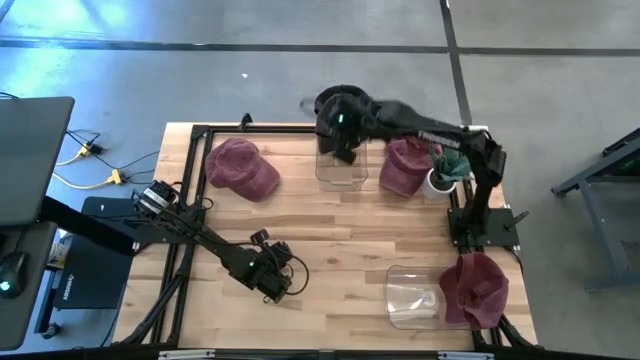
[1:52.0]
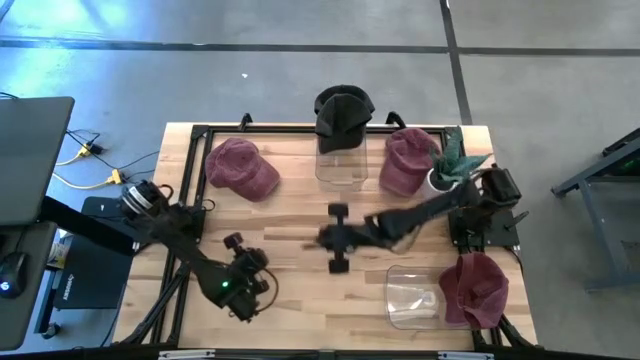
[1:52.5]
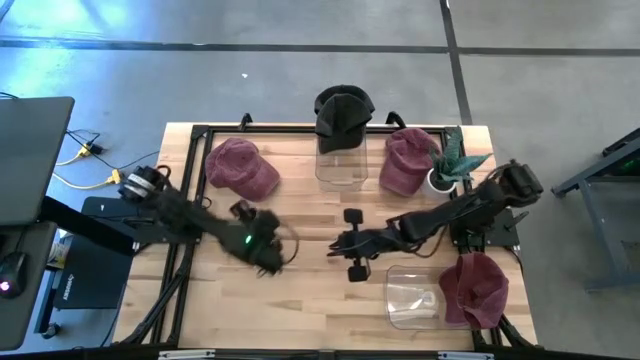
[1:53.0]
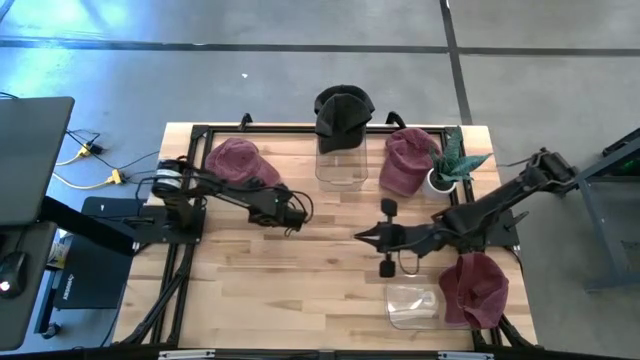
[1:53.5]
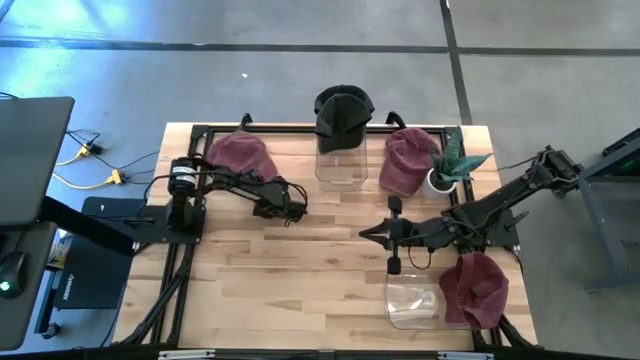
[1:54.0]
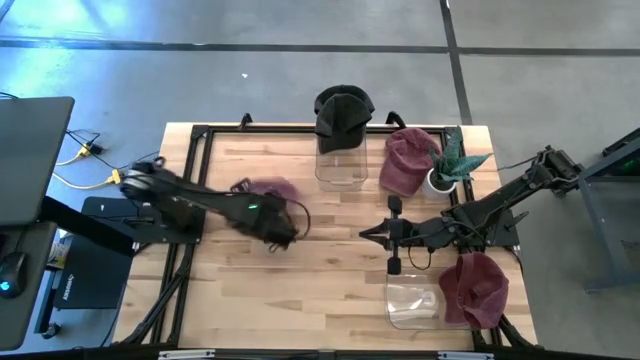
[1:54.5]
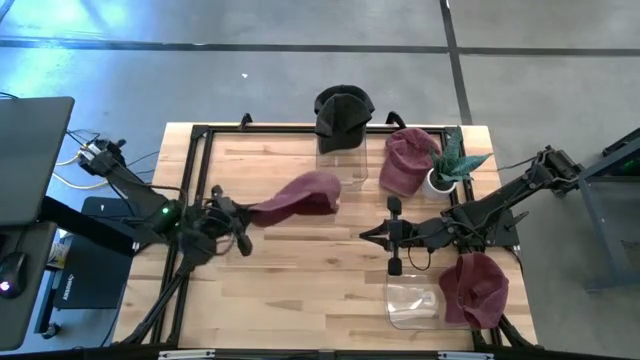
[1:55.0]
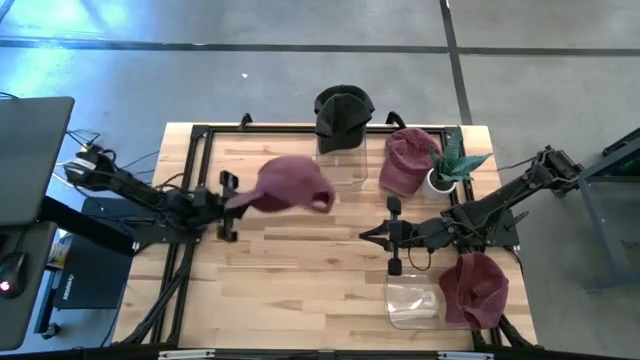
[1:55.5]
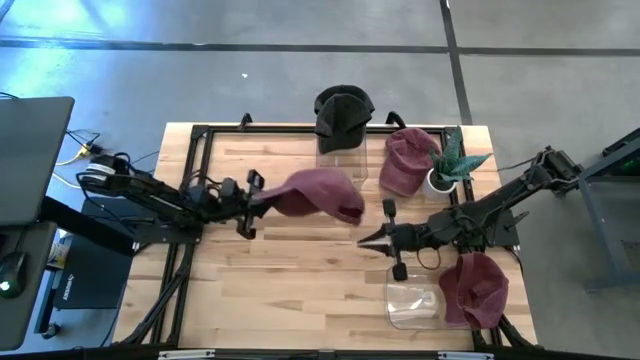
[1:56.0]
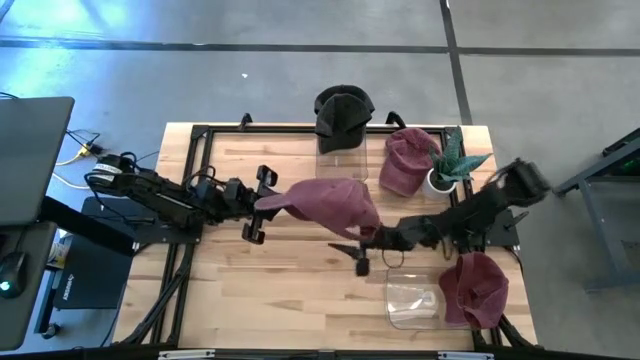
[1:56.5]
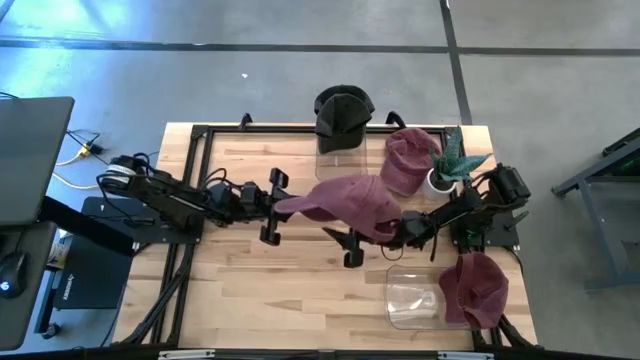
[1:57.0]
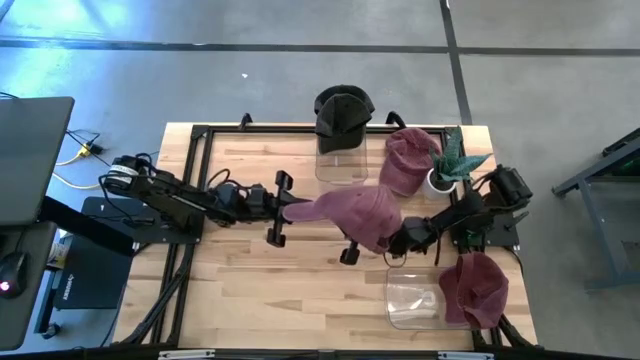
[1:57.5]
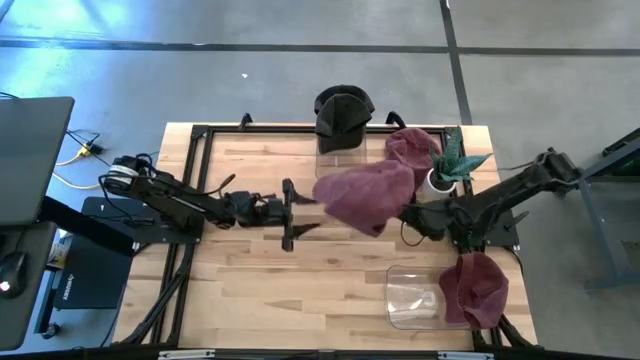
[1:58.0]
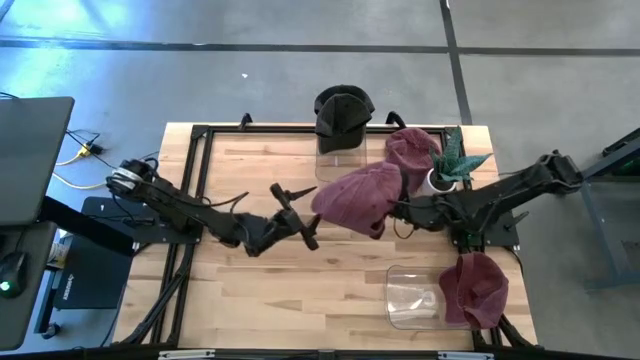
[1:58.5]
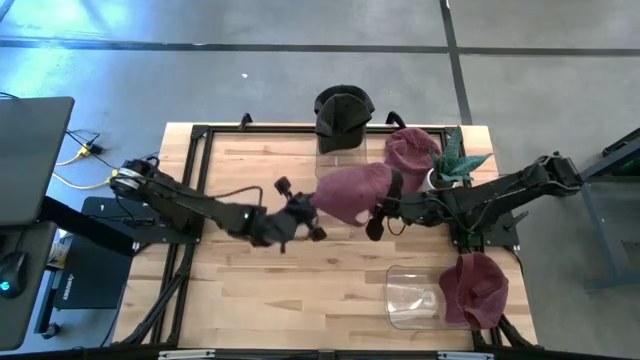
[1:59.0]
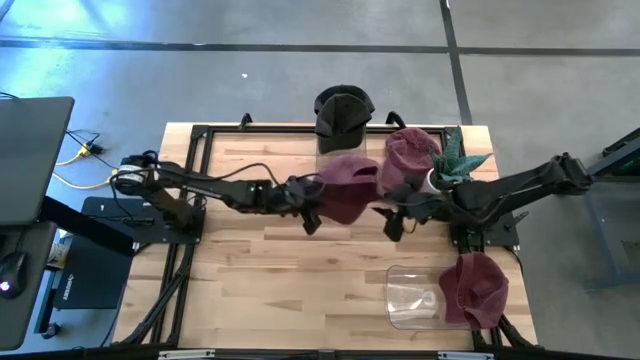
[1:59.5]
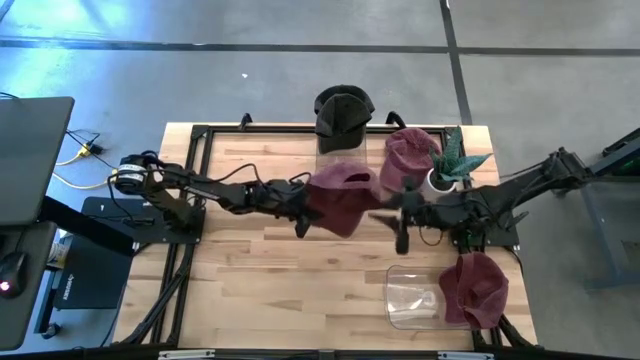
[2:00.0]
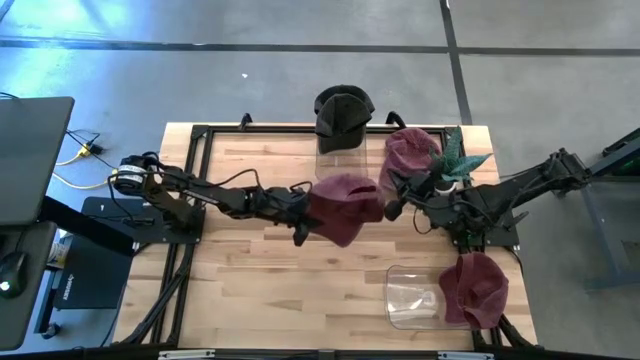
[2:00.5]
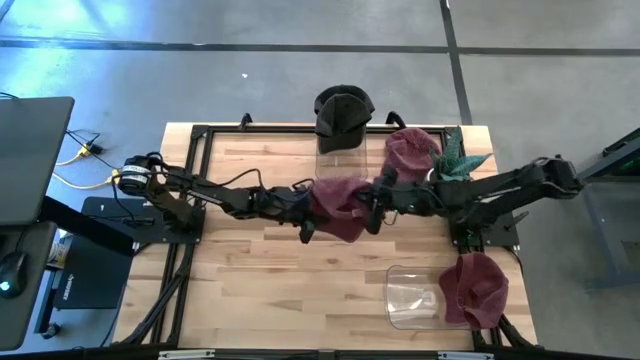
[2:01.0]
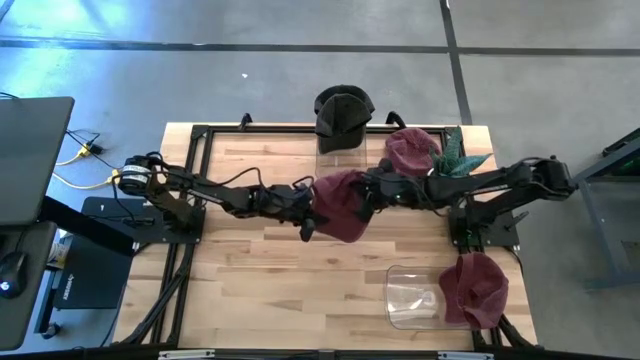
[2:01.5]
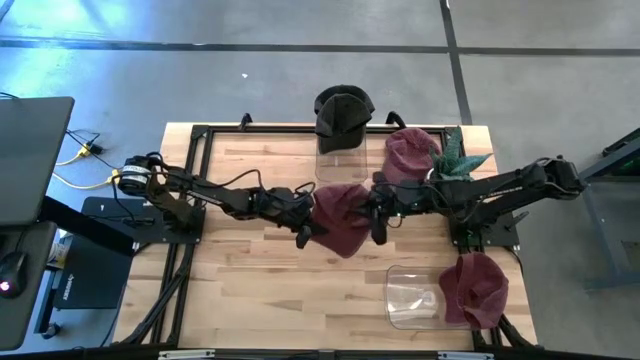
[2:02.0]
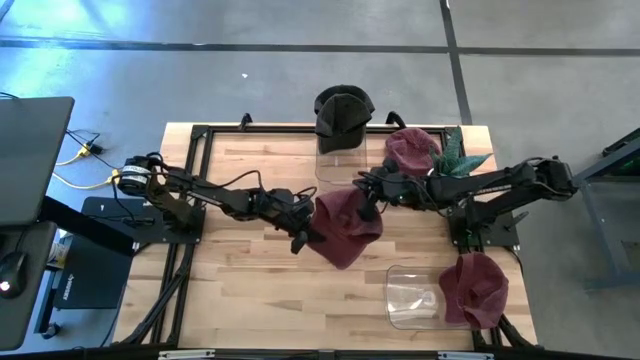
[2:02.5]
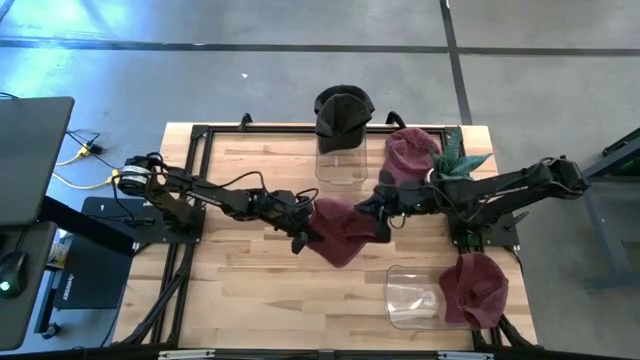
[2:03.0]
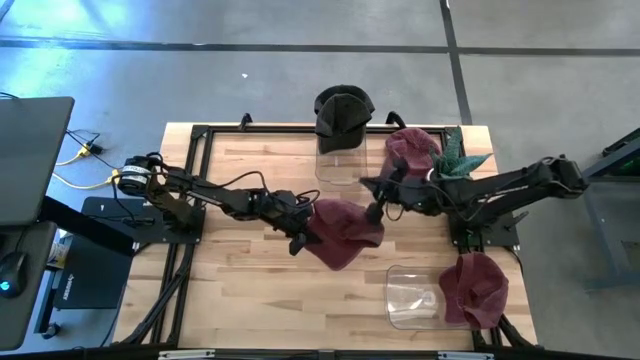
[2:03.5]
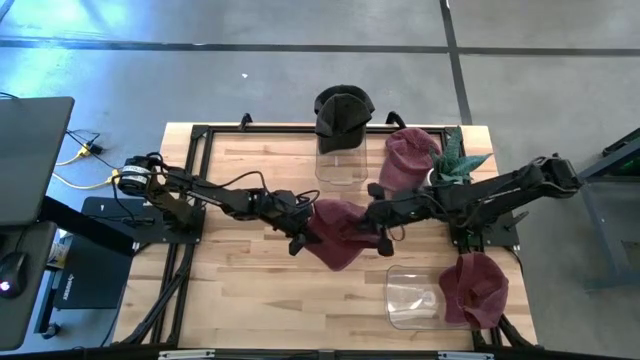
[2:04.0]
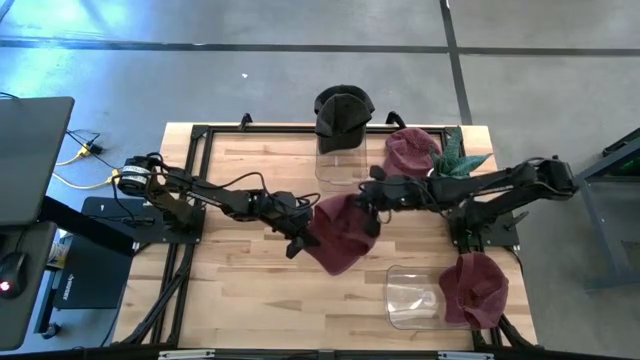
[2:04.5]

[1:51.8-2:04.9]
Task: Pick & Place hat
Put the left red cap into the bottom transparent bin

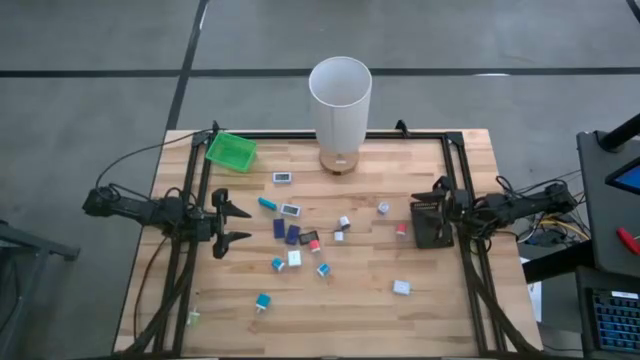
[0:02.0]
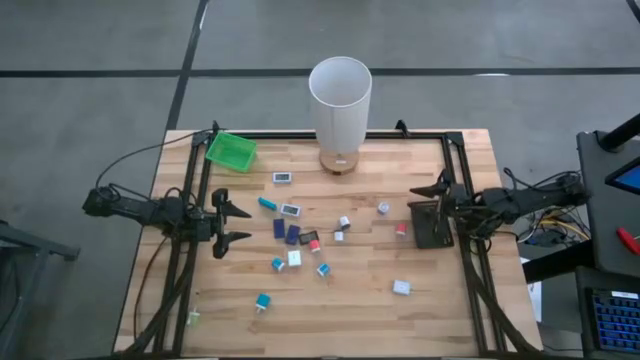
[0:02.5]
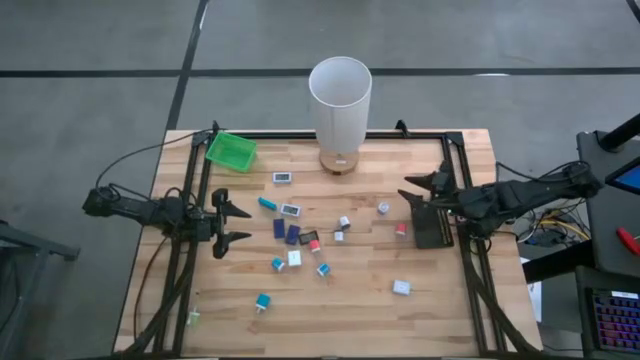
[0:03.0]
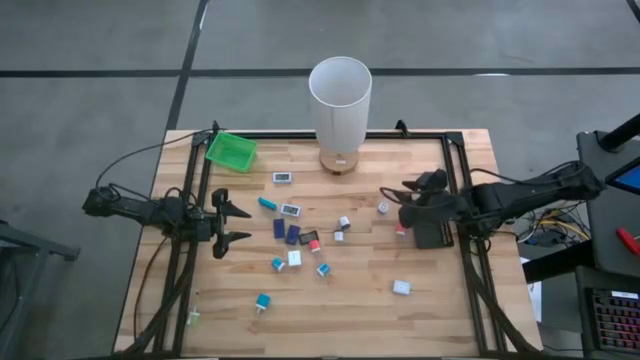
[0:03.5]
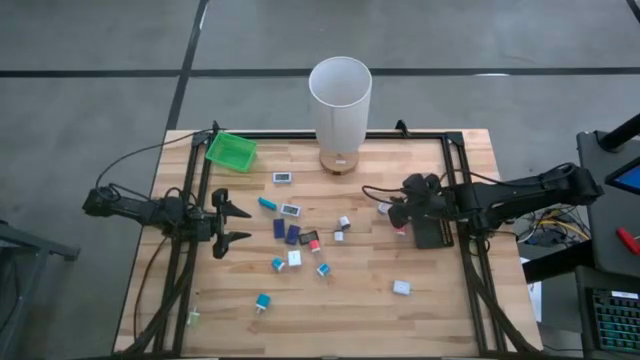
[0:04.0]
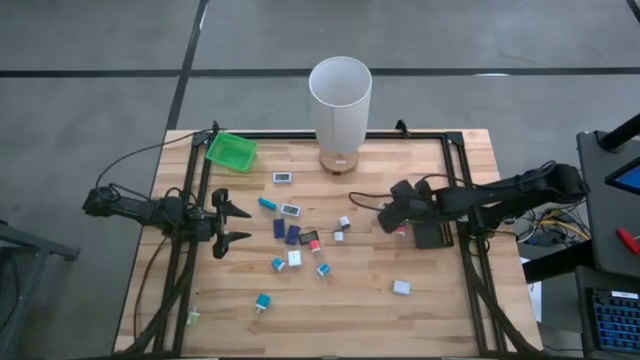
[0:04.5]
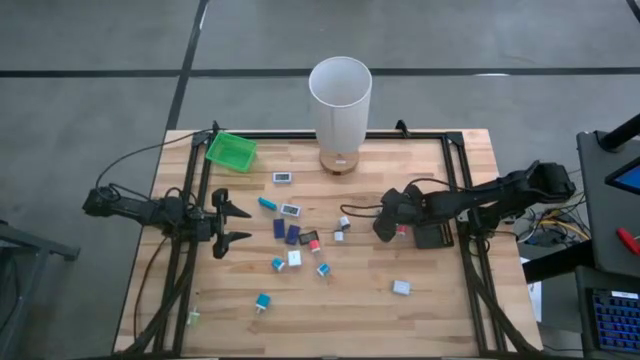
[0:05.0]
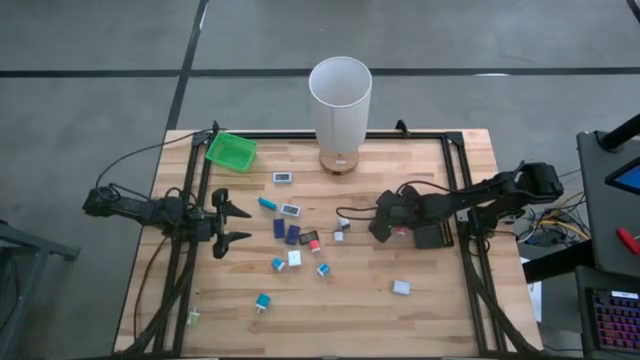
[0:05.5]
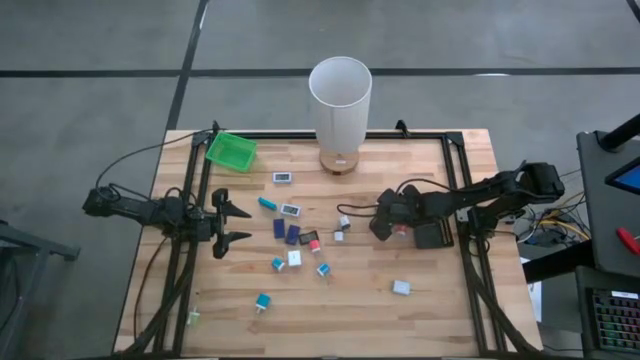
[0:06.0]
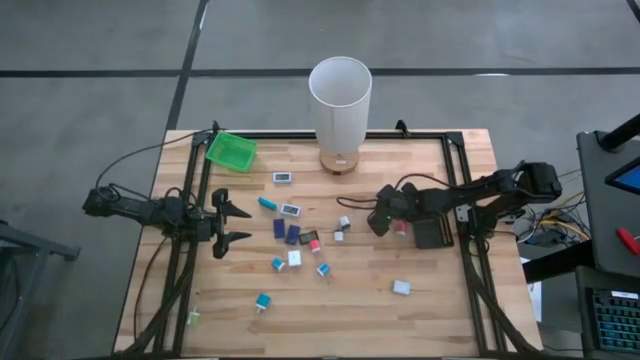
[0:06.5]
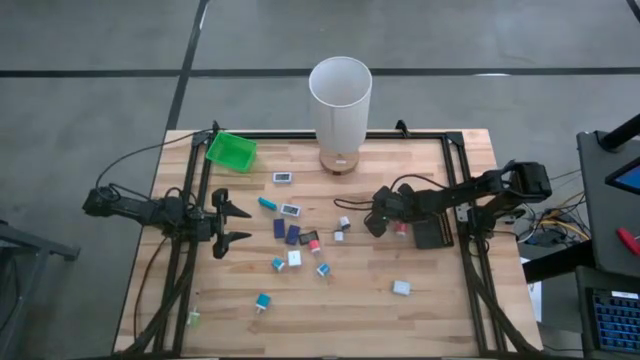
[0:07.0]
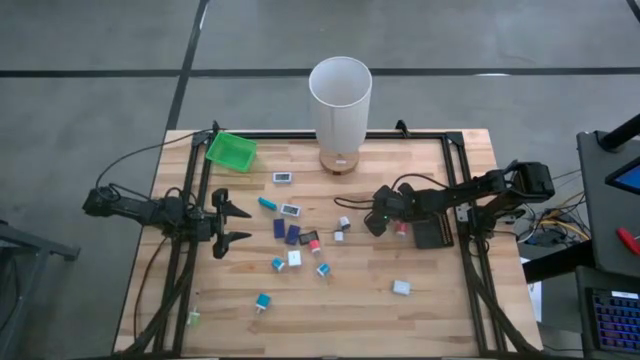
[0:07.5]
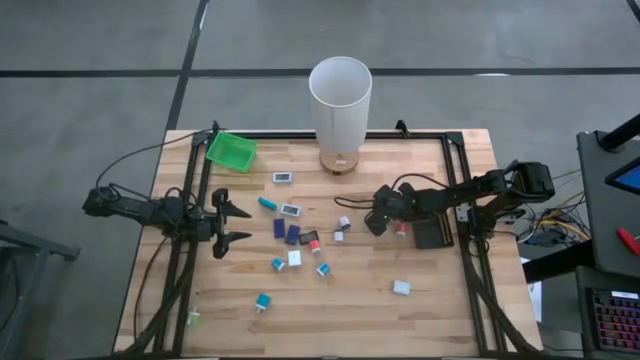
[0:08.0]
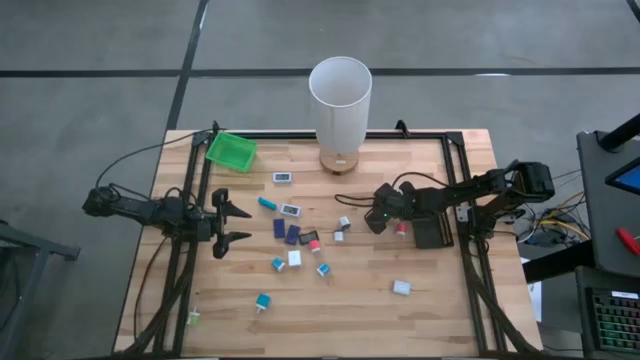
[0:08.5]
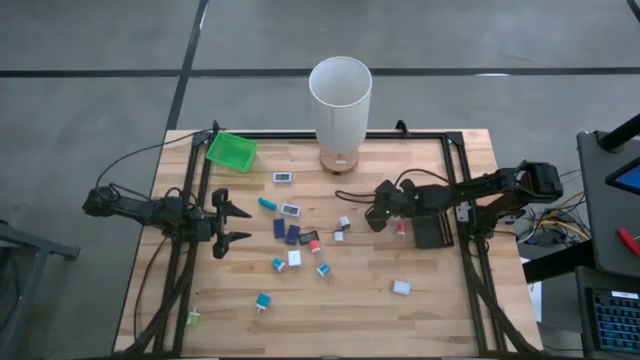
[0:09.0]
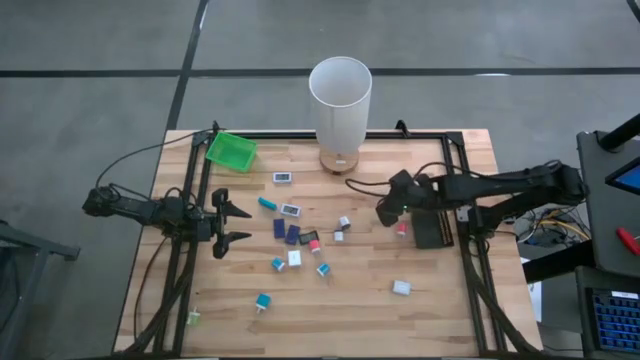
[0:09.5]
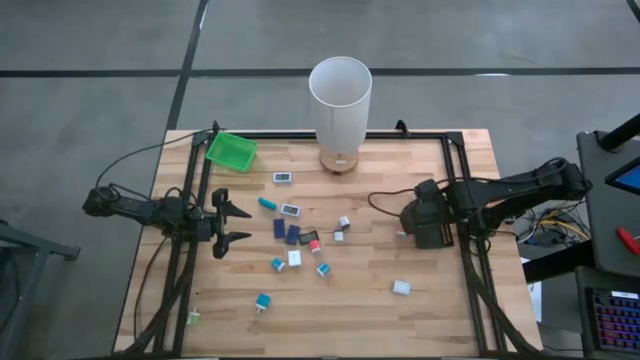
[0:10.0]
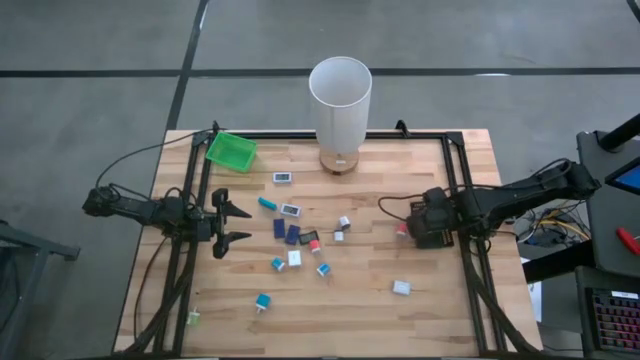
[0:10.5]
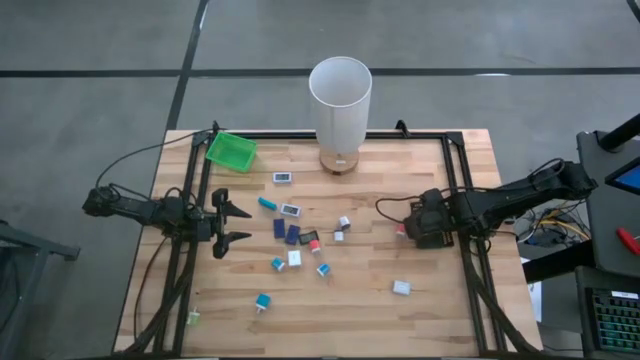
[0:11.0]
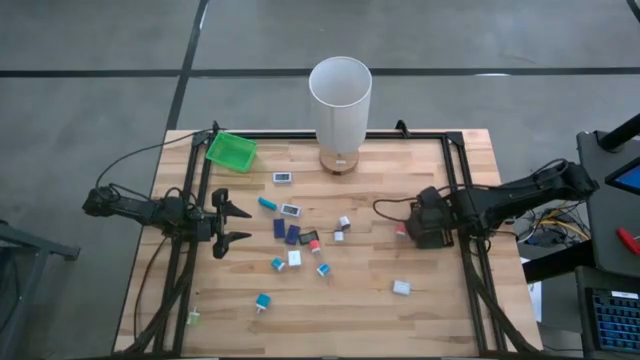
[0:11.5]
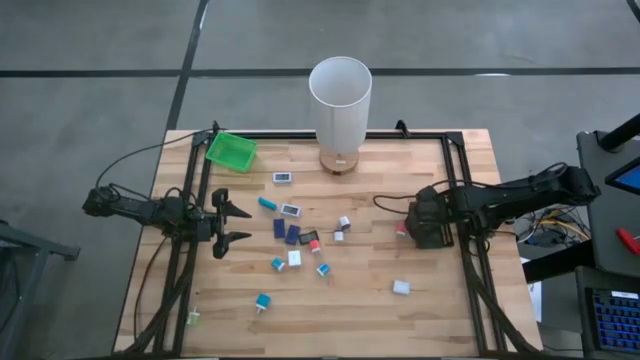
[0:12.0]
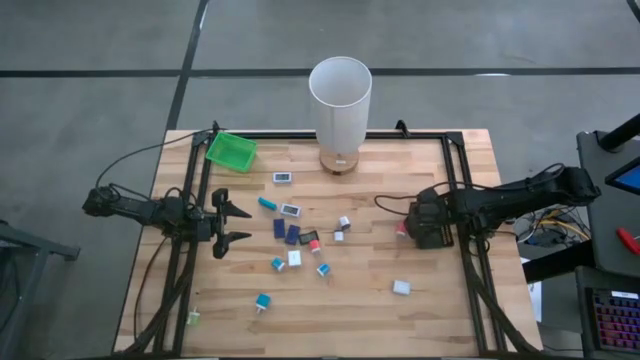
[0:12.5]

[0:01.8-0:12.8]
Task: Pick & Place Office items
Put the violet charger adapter into the black bin
